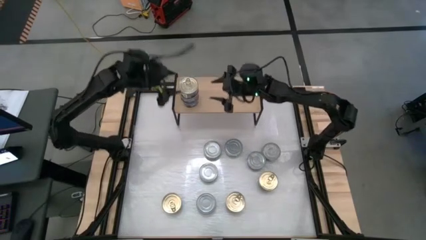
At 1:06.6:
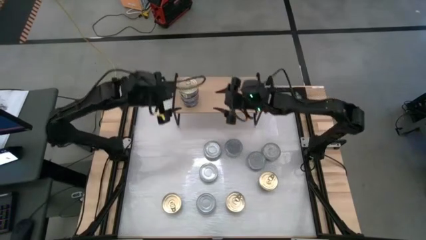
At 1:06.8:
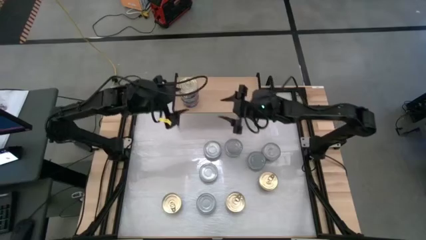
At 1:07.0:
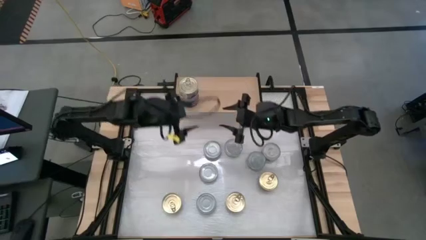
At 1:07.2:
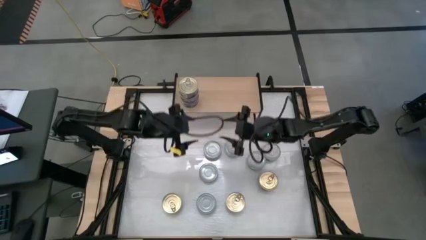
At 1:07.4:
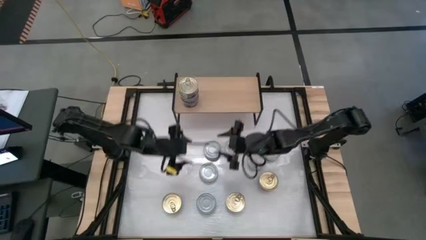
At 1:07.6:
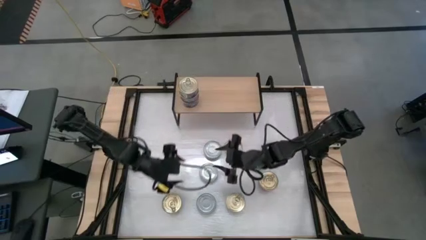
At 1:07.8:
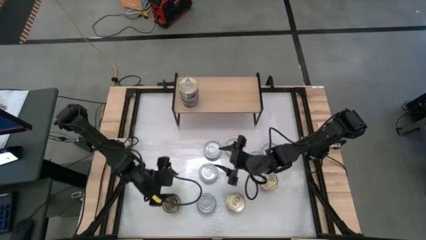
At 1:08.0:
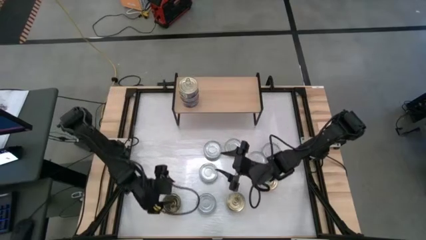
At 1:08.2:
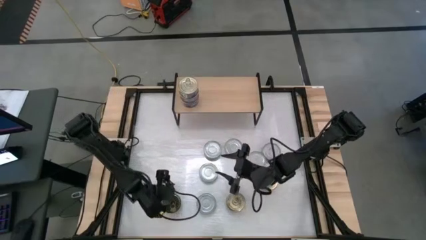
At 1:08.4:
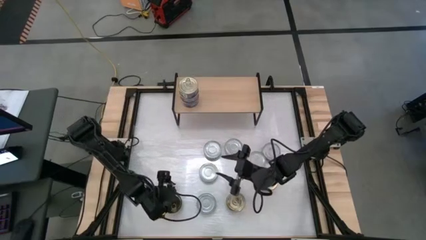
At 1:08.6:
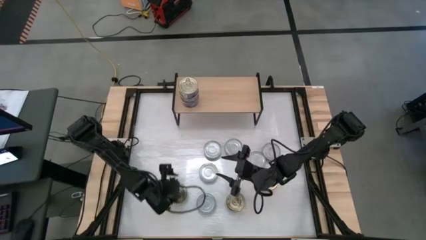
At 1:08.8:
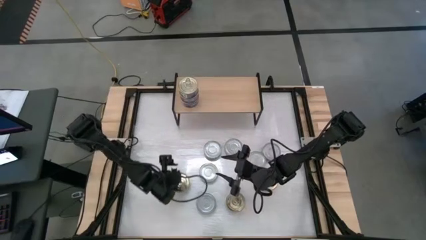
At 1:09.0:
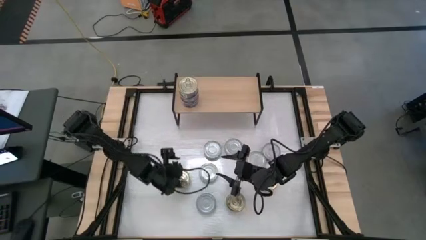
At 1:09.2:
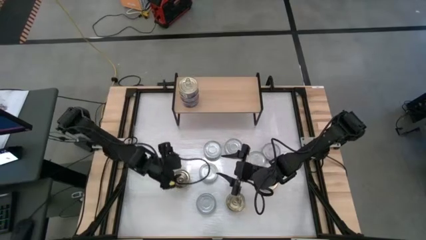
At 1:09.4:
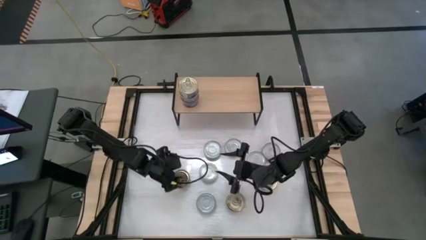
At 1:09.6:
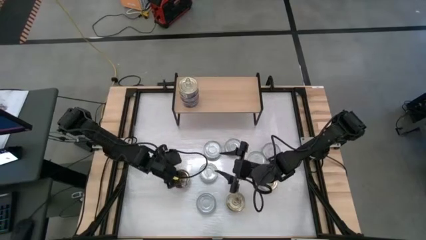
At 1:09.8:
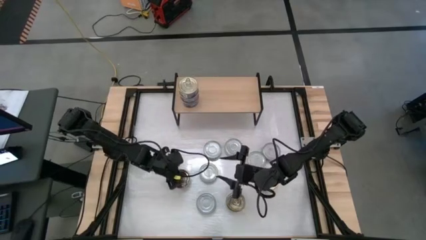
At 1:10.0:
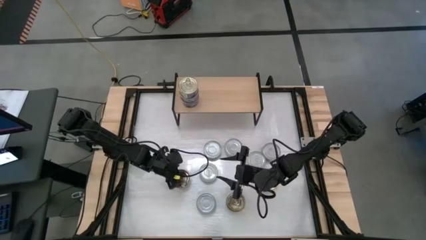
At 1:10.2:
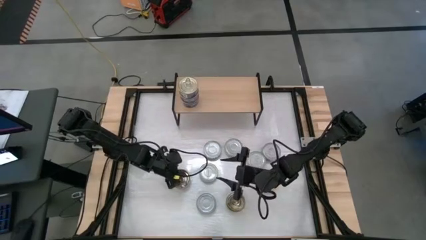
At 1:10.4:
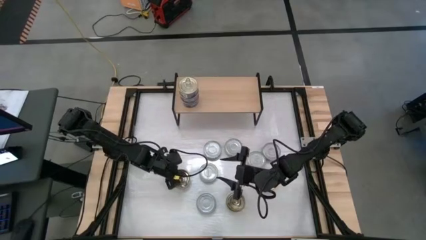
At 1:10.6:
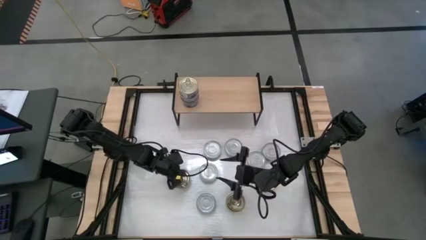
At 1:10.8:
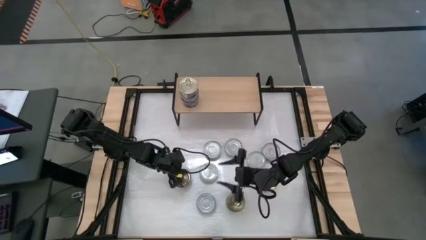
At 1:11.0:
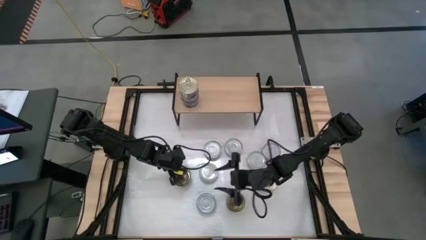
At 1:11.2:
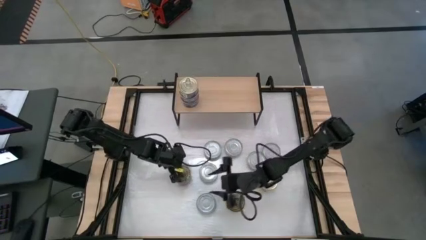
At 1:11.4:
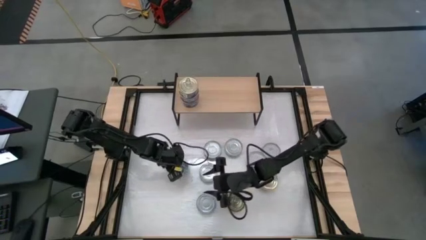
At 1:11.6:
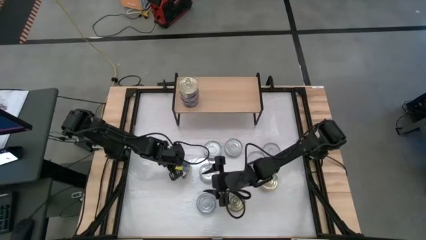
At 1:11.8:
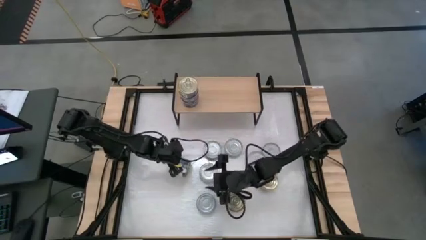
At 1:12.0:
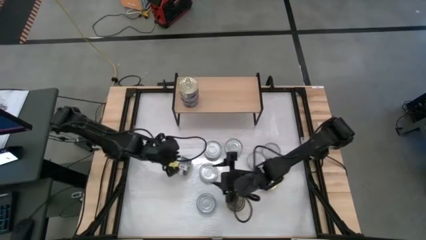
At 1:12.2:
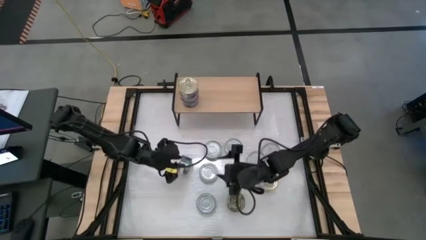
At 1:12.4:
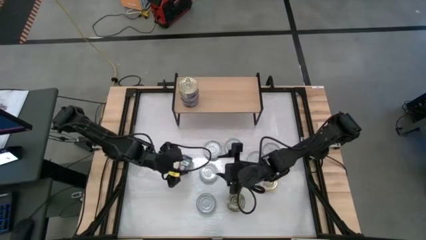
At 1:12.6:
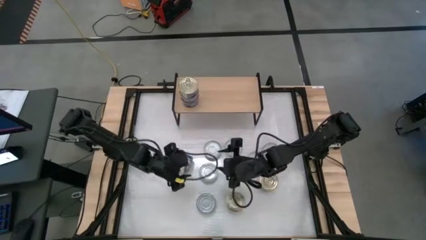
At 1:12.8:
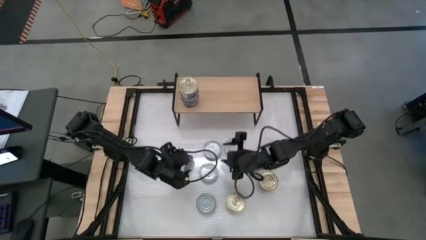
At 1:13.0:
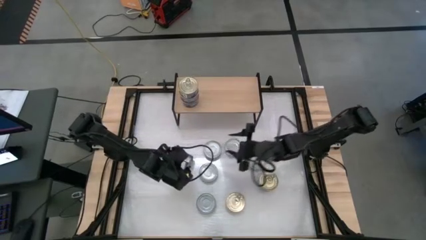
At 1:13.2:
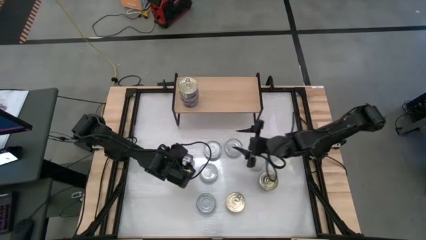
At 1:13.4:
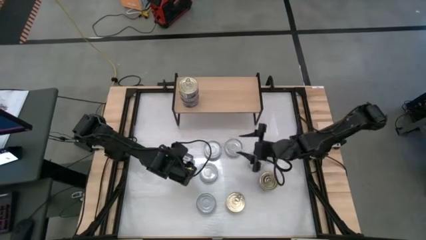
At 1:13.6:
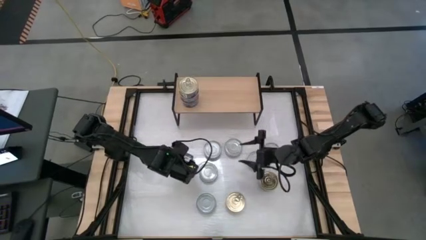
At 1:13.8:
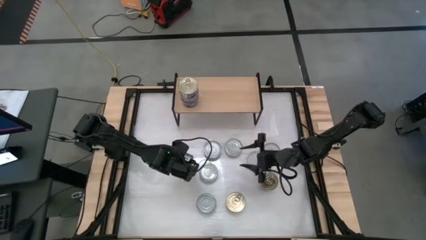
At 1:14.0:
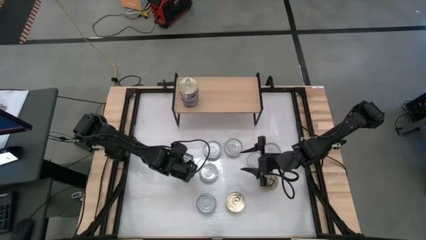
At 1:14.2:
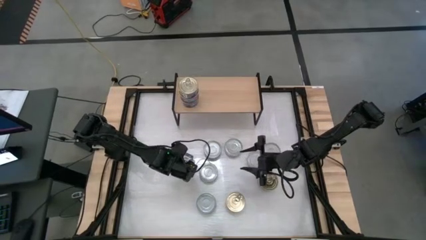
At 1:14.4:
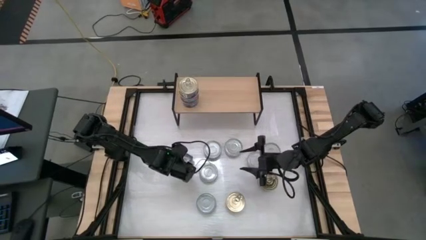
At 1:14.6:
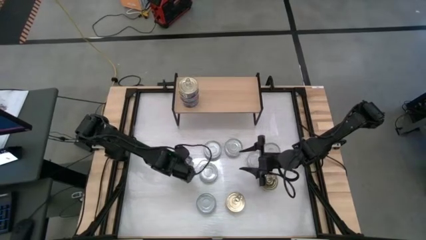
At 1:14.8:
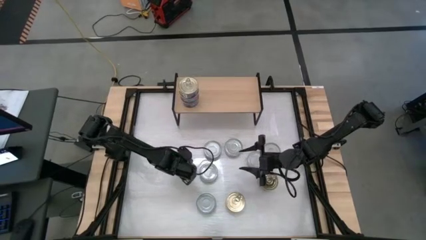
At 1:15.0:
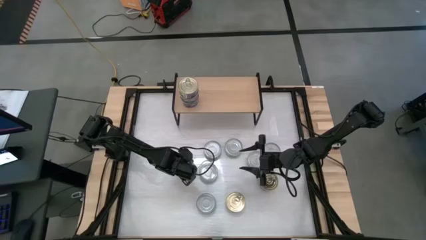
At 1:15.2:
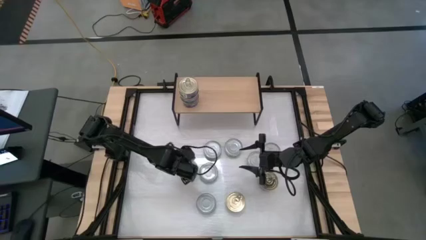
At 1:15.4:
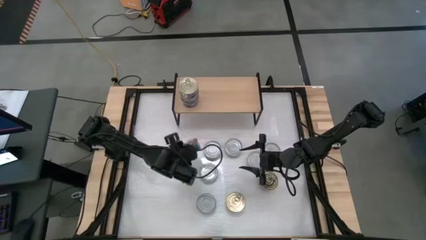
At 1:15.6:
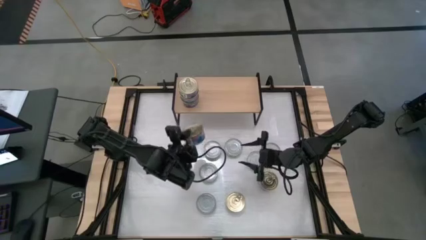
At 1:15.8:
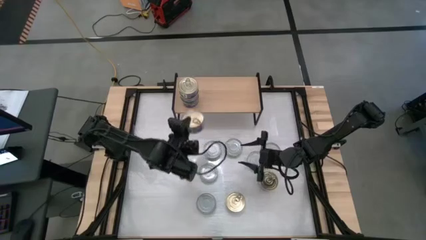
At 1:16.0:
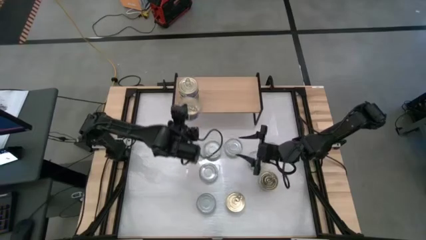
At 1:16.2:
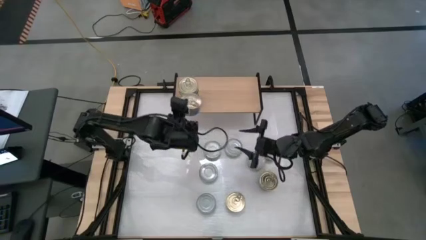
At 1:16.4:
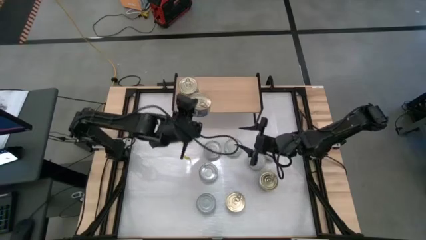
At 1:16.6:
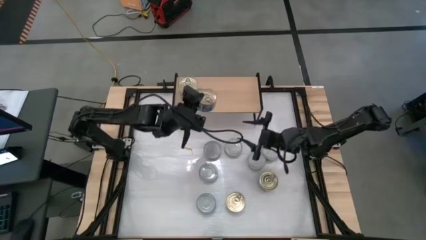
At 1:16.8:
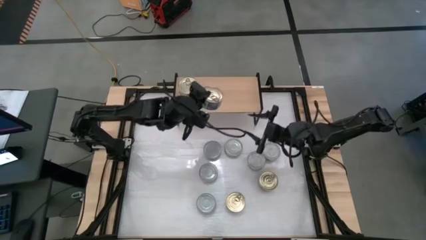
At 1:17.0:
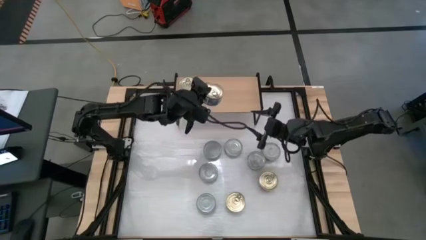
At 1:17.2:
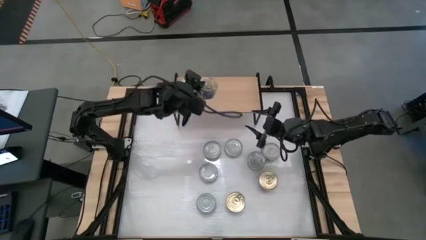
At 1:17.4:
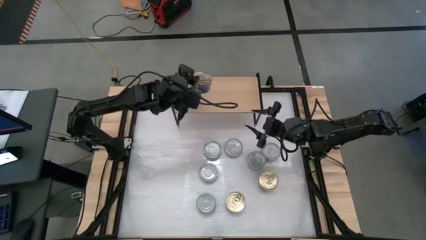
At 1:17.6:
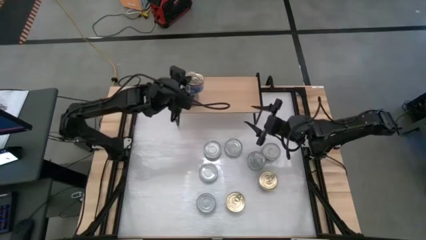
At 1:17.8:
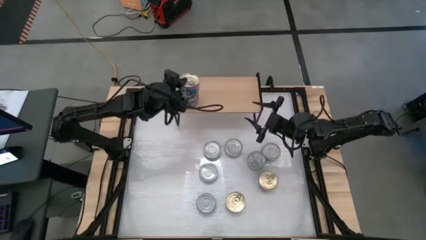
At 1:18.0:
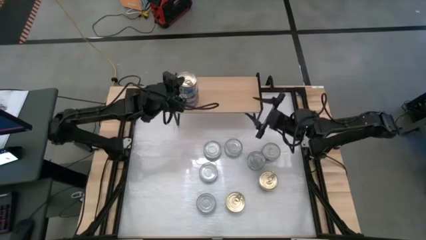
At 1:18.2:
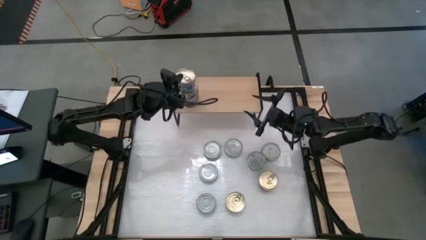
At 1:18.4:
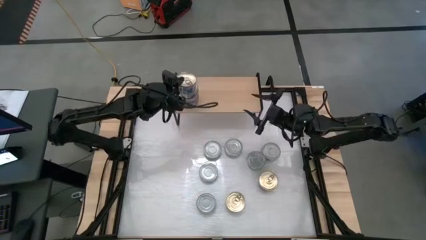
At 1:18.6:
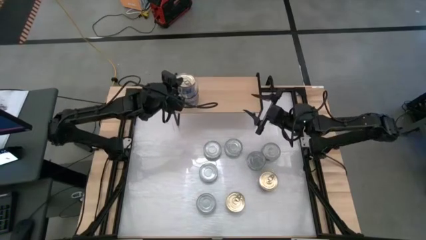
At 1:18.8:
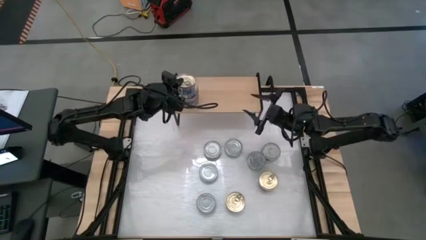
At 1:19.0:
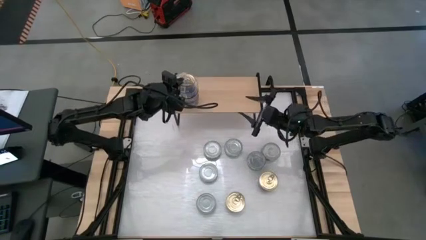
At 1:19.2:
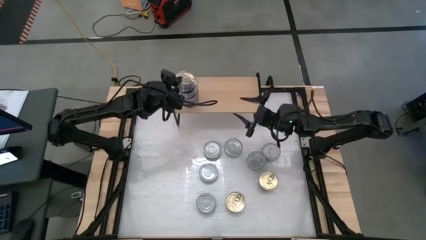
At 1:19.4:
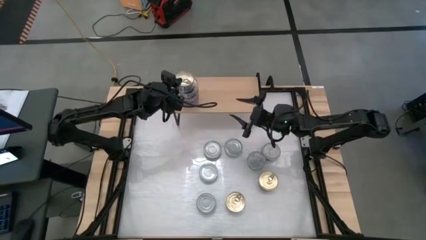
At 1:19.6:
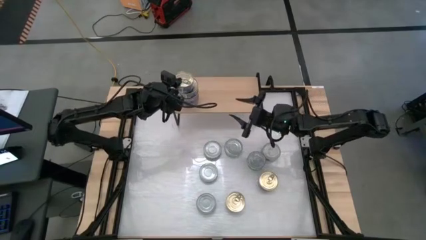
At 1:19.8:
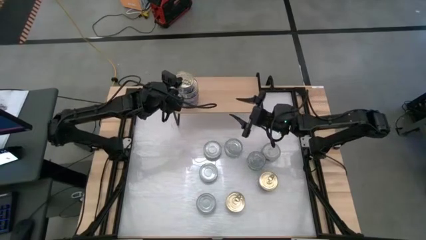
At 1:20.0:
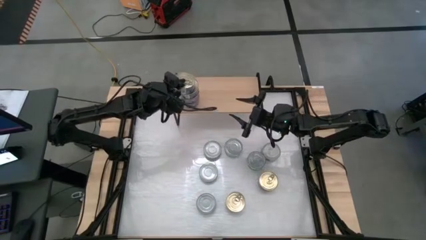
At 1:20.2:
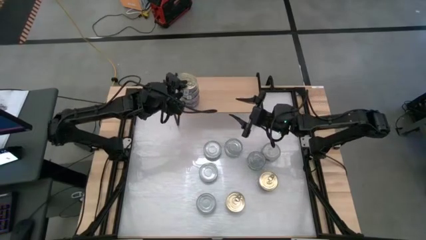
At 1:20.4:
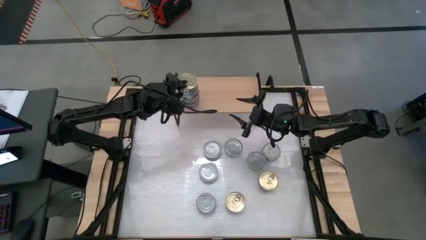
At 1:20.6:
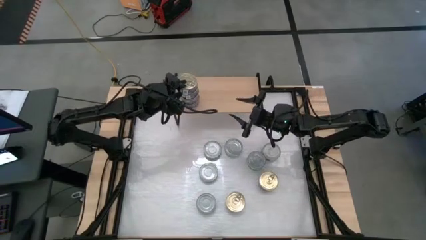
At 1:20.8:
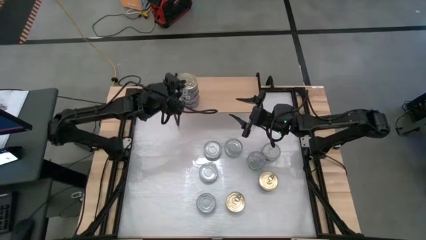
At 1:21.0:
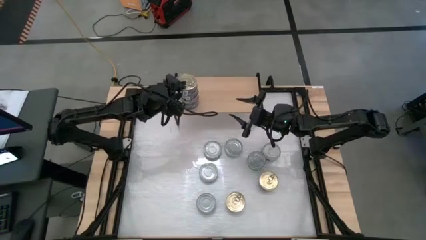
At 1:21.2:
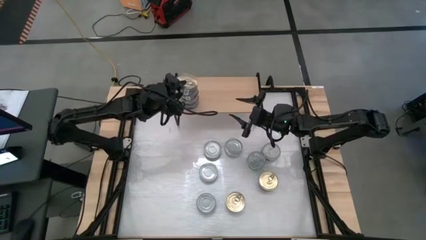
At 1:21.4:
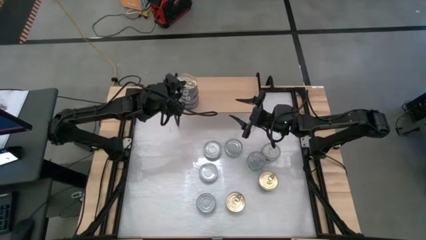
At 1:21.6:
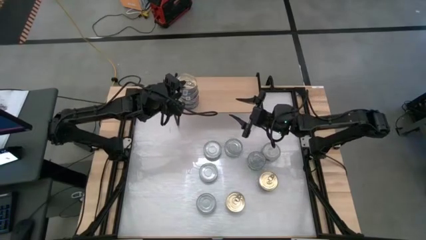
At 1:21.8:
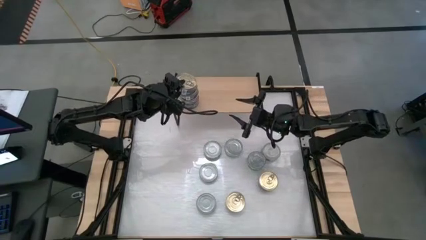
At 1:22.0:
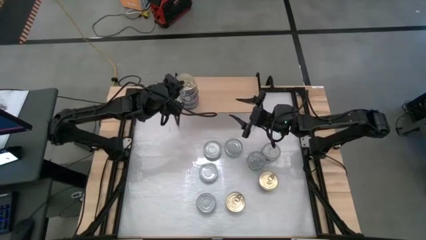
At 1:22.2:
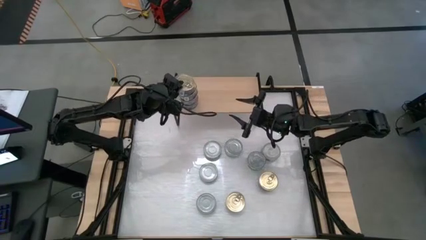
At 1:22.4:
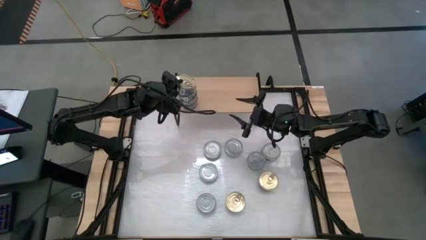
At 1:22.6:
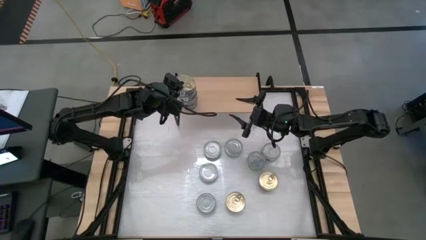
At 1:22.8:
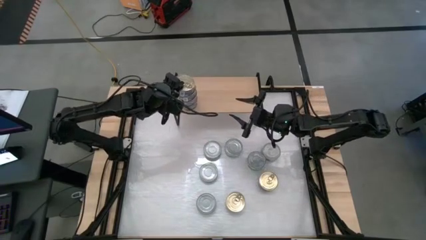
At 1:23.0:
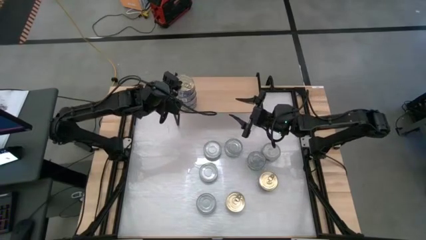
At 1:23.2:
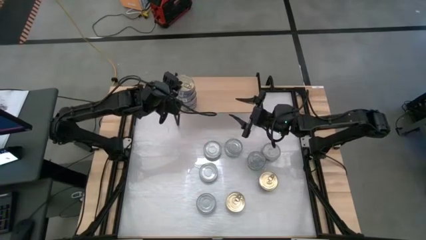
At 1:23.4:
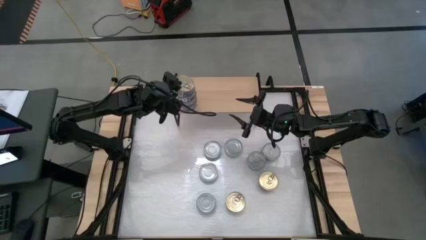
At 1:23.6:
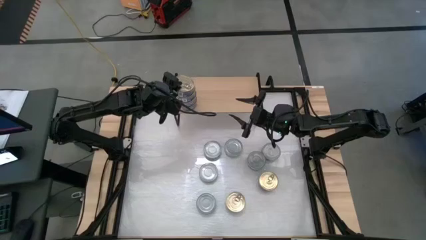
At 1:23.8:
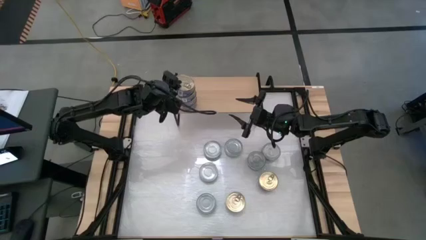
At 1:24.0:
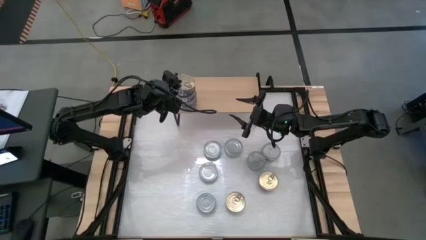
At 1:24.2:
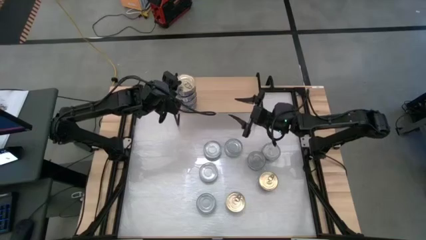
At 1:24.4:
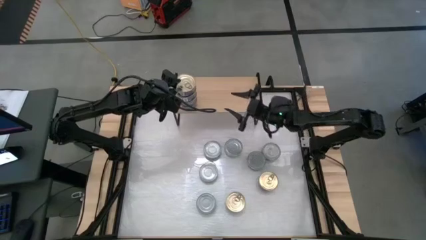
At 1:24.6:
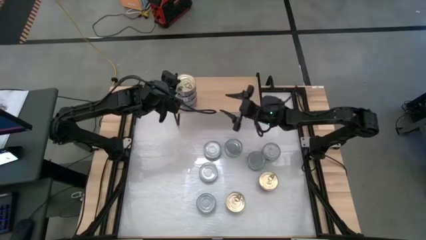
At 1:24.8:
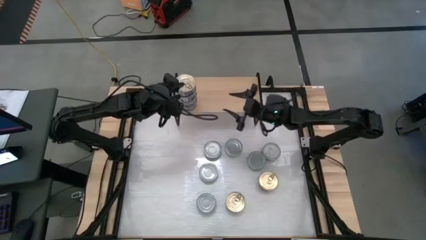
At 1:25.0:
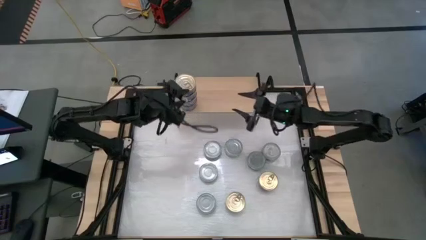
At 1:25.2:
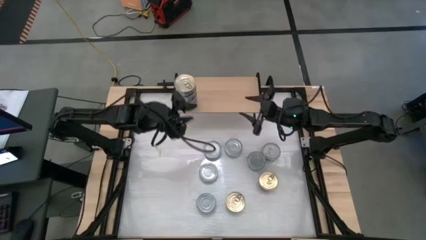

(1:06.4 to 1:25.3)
Task: Stack canned seafood by type on shelf
Stack the blue tuna can on top of the other blue tuna cans on the shelf
